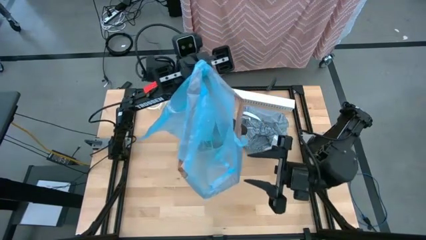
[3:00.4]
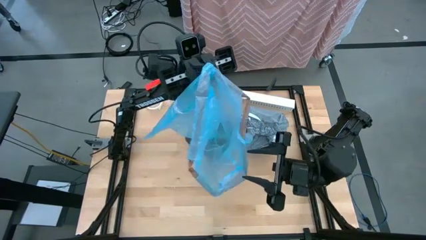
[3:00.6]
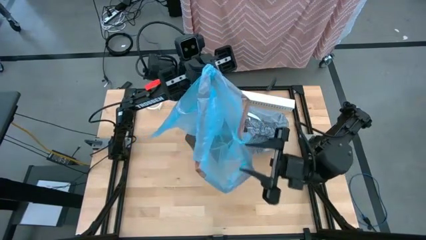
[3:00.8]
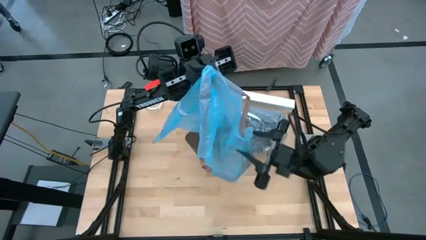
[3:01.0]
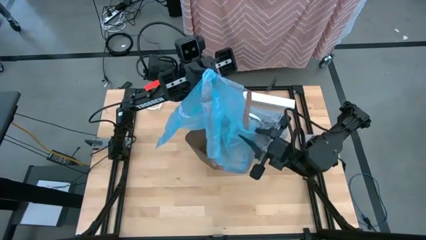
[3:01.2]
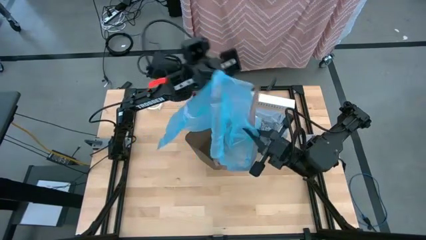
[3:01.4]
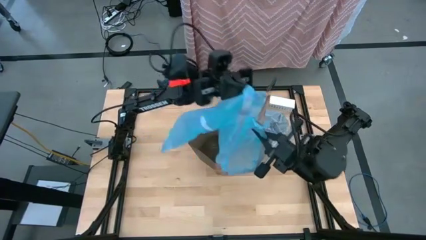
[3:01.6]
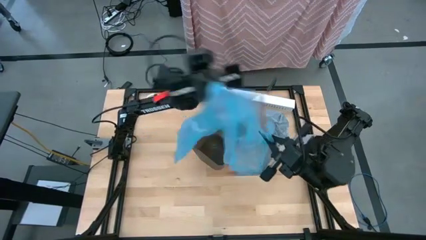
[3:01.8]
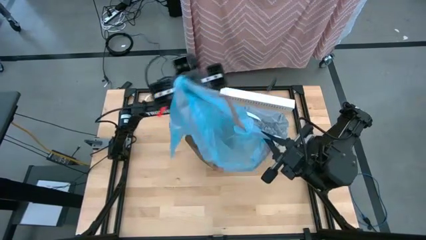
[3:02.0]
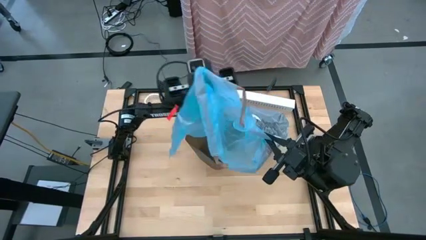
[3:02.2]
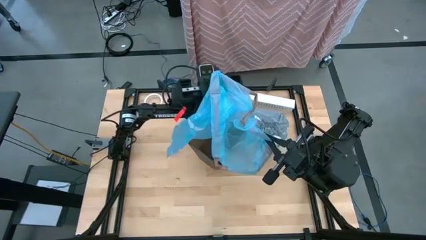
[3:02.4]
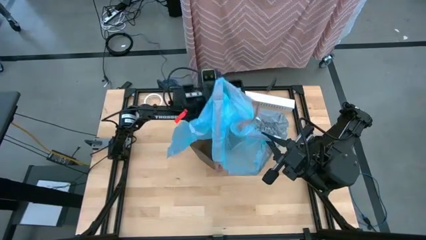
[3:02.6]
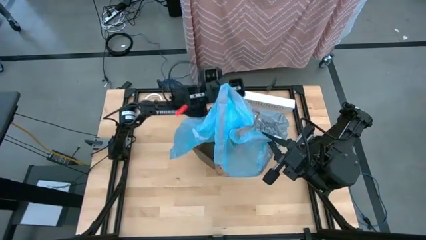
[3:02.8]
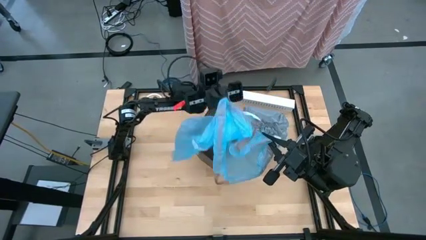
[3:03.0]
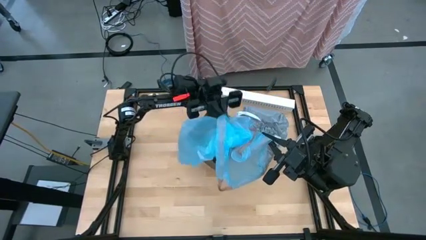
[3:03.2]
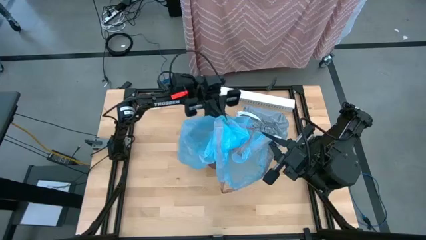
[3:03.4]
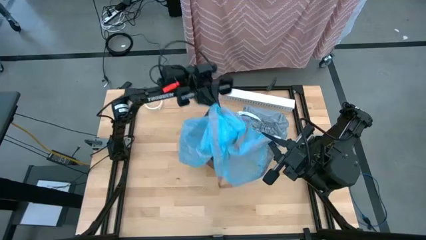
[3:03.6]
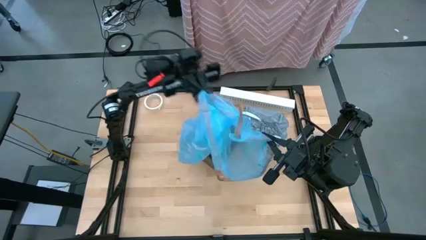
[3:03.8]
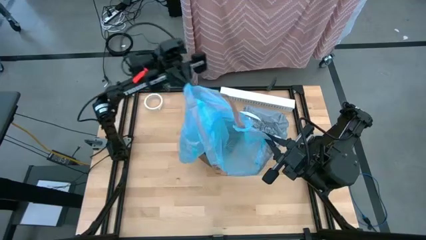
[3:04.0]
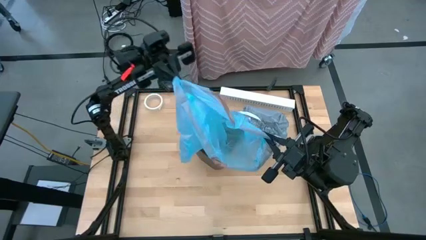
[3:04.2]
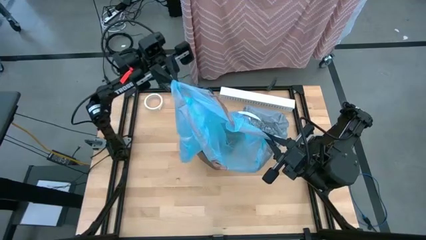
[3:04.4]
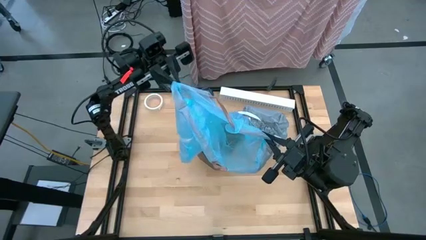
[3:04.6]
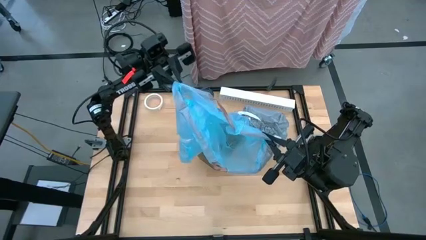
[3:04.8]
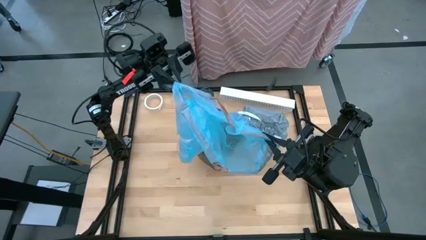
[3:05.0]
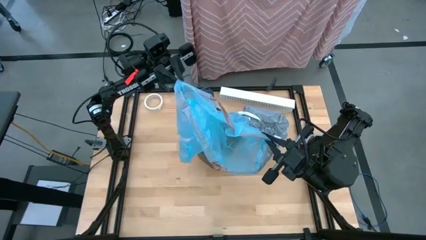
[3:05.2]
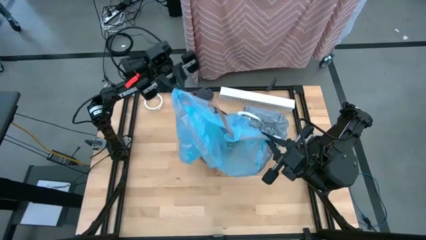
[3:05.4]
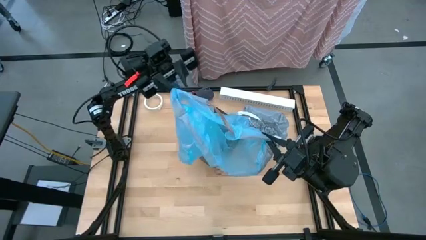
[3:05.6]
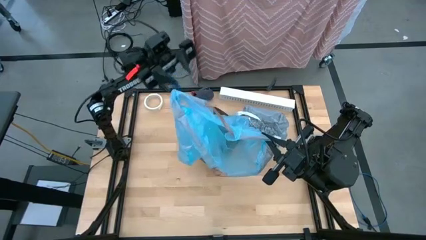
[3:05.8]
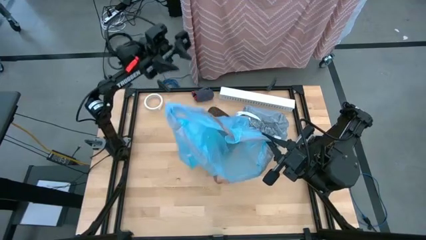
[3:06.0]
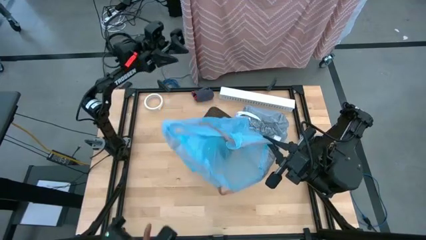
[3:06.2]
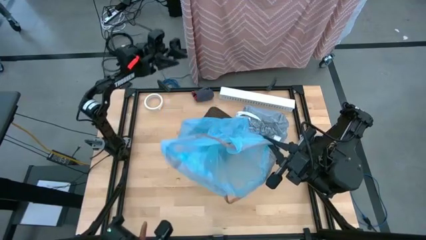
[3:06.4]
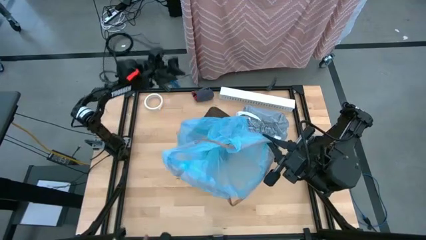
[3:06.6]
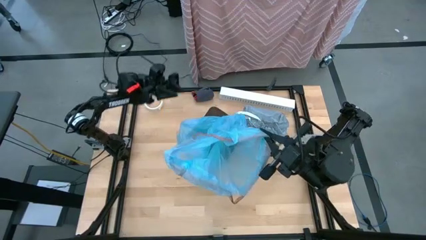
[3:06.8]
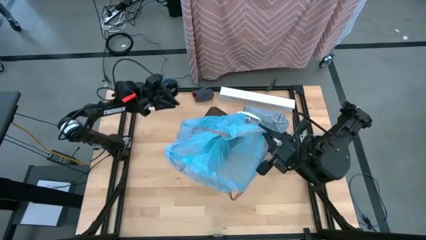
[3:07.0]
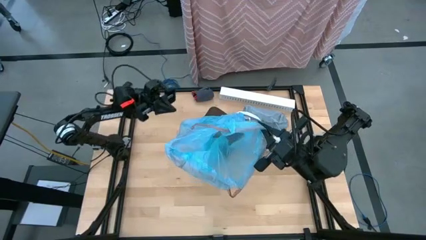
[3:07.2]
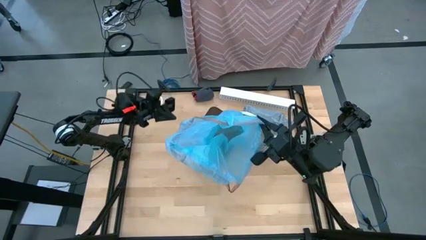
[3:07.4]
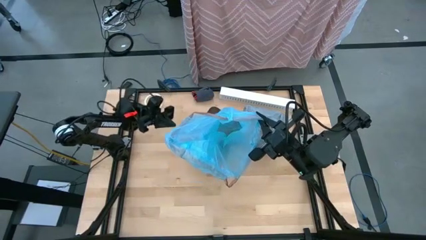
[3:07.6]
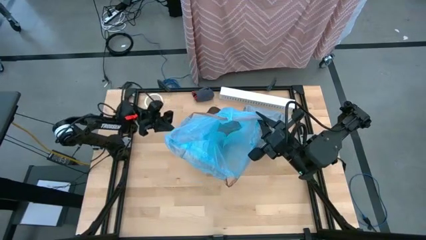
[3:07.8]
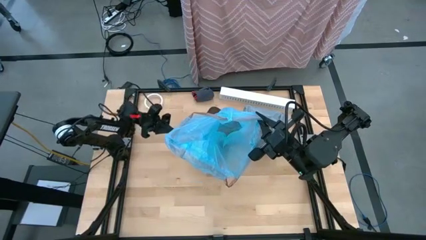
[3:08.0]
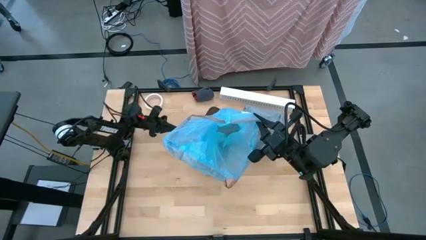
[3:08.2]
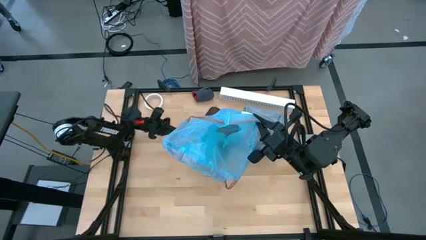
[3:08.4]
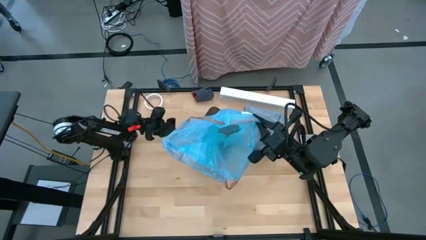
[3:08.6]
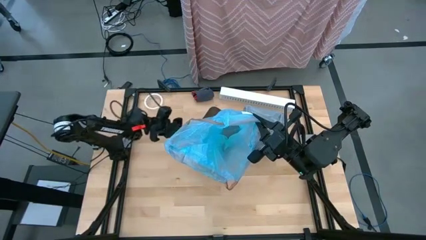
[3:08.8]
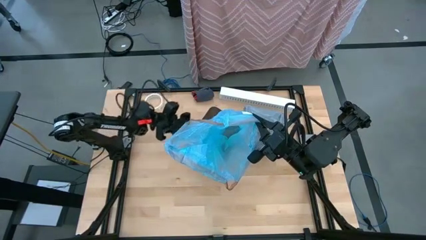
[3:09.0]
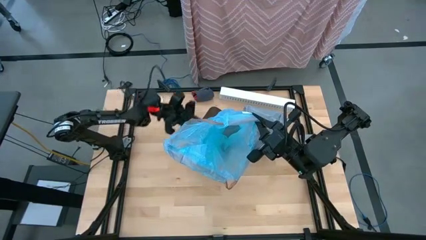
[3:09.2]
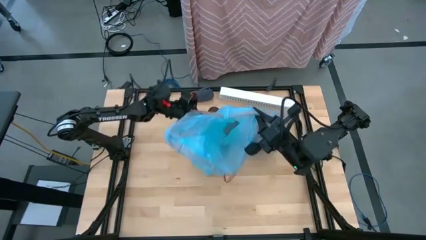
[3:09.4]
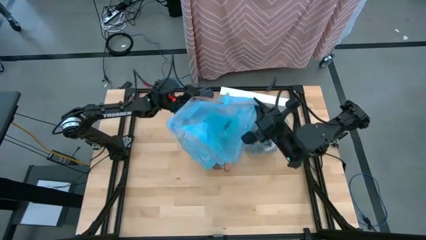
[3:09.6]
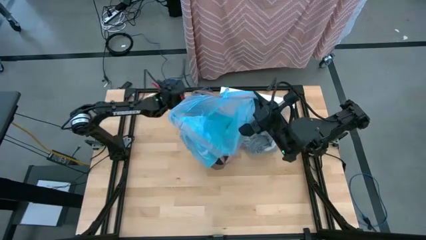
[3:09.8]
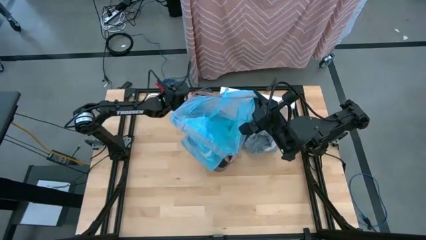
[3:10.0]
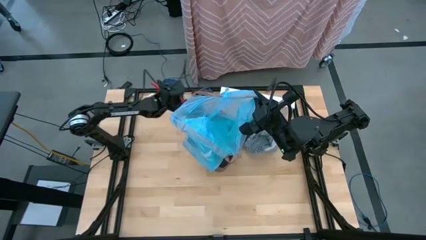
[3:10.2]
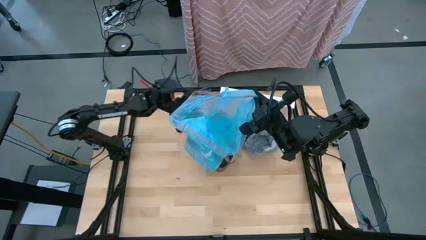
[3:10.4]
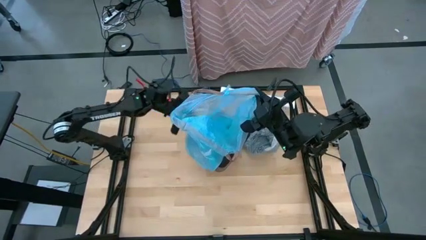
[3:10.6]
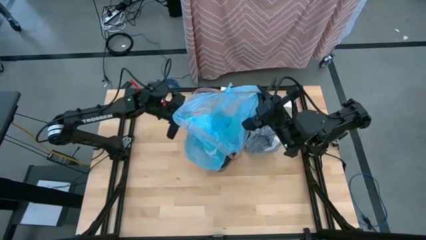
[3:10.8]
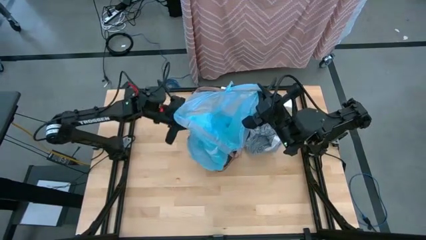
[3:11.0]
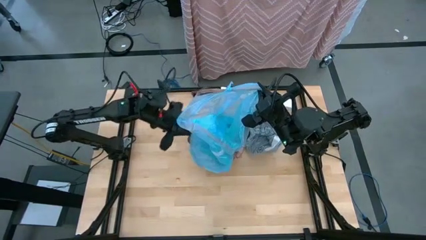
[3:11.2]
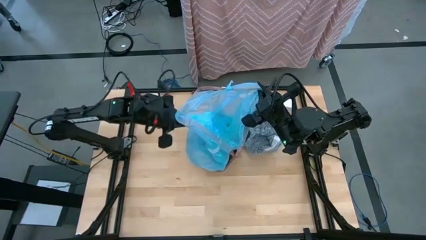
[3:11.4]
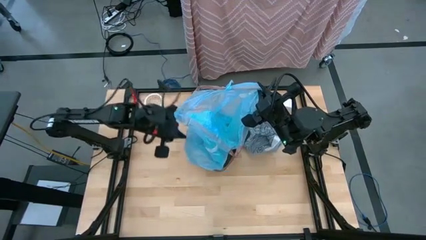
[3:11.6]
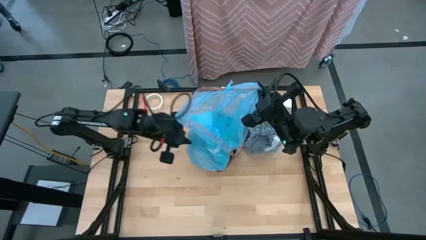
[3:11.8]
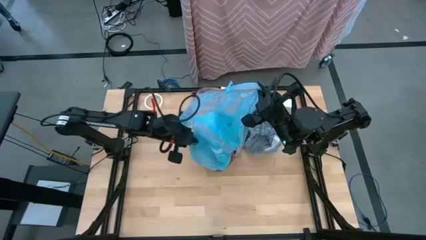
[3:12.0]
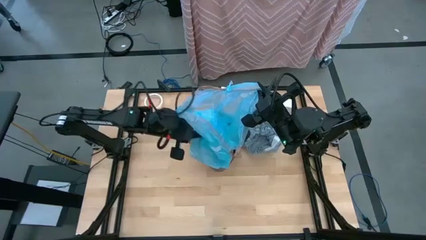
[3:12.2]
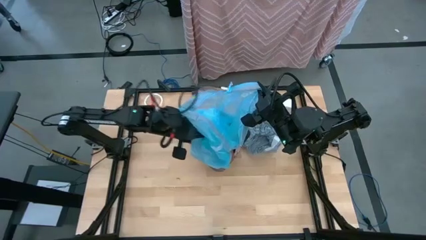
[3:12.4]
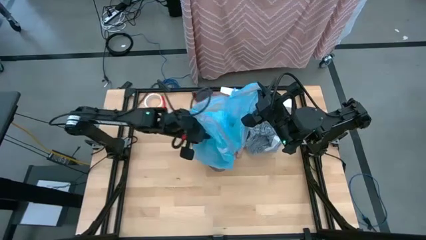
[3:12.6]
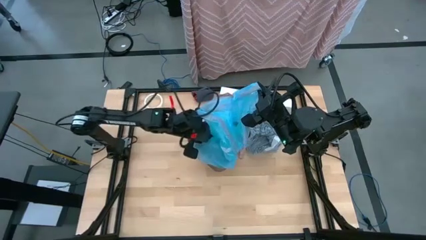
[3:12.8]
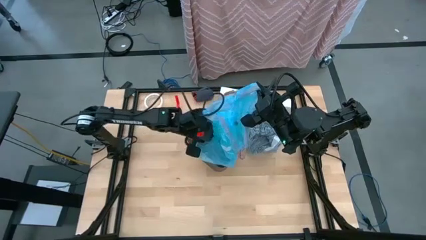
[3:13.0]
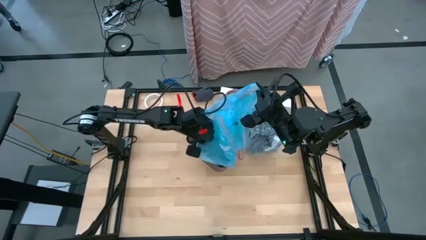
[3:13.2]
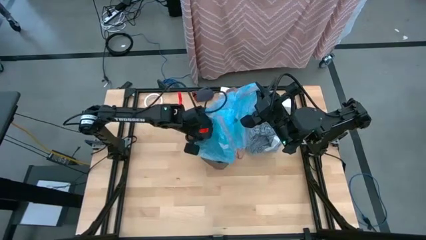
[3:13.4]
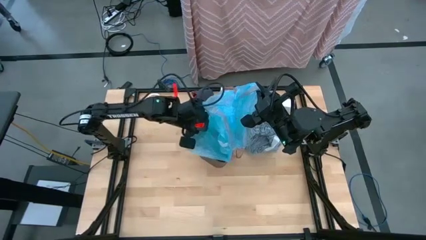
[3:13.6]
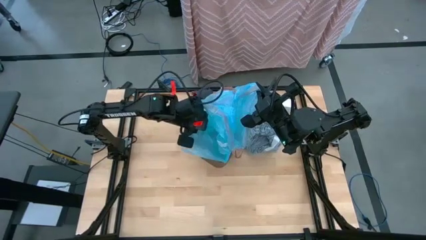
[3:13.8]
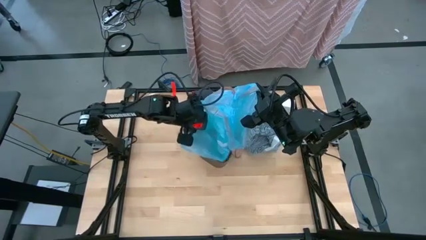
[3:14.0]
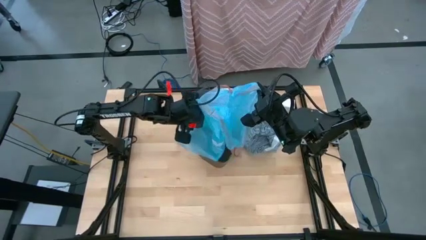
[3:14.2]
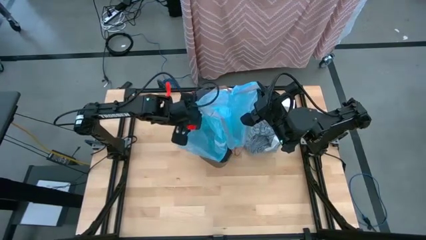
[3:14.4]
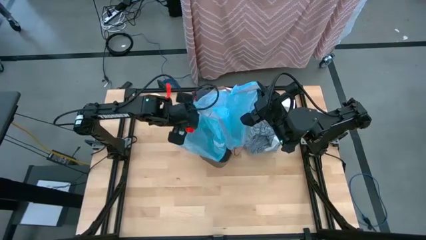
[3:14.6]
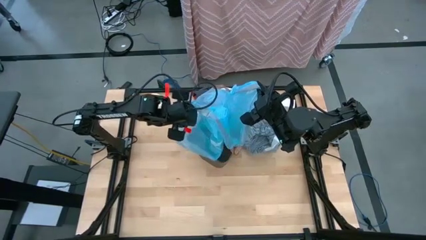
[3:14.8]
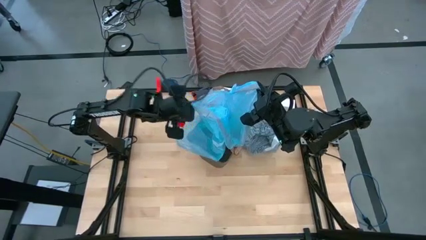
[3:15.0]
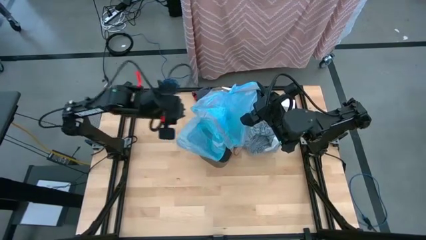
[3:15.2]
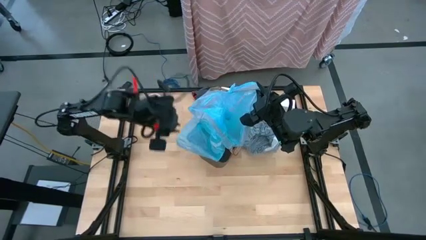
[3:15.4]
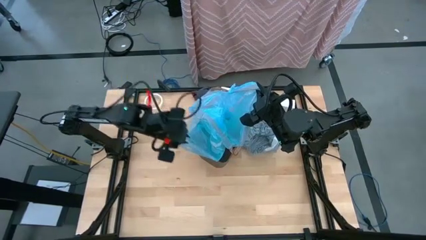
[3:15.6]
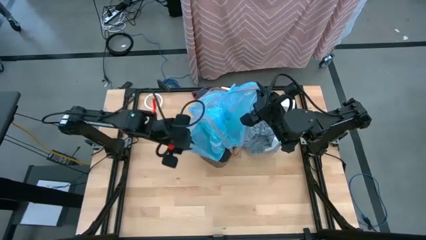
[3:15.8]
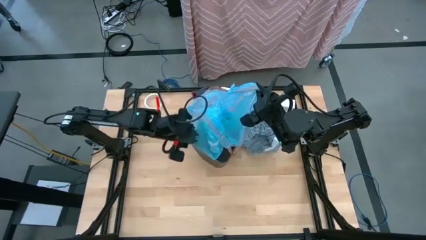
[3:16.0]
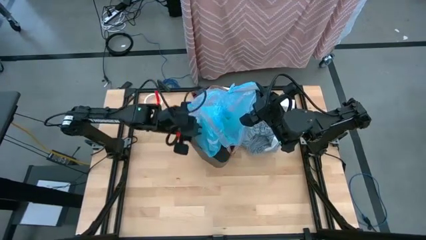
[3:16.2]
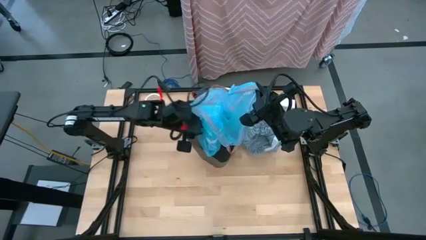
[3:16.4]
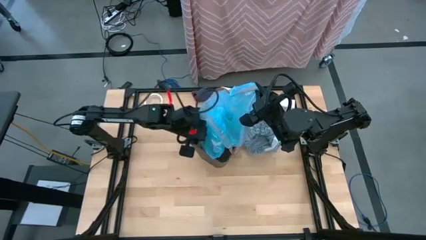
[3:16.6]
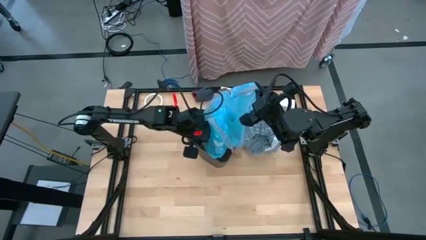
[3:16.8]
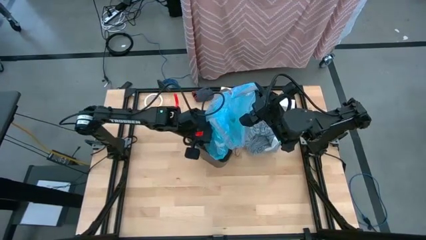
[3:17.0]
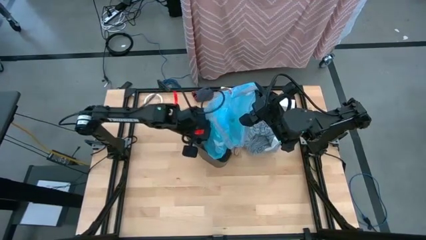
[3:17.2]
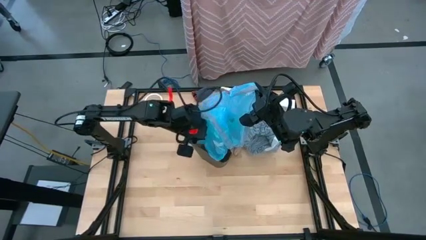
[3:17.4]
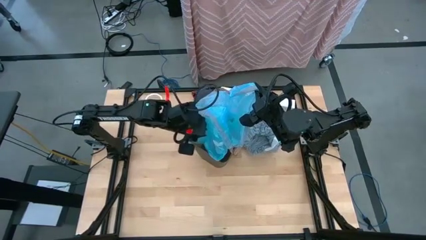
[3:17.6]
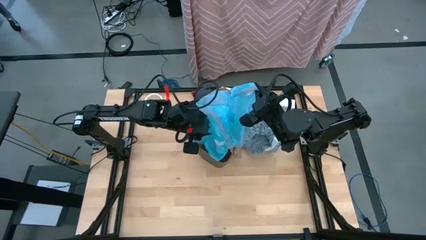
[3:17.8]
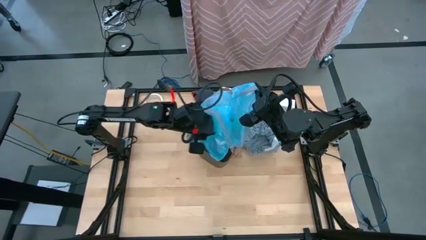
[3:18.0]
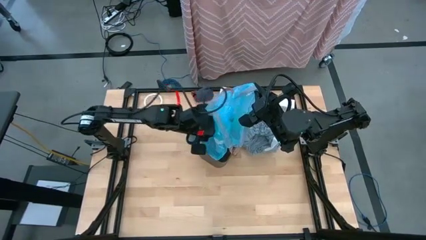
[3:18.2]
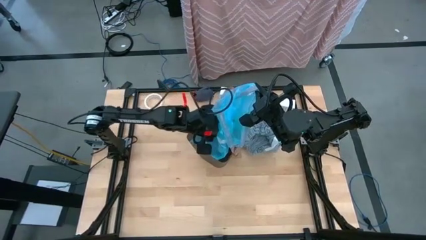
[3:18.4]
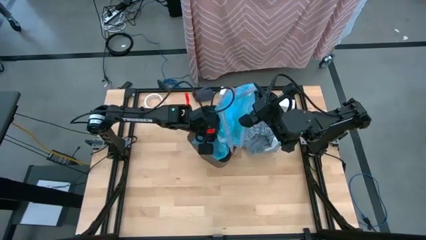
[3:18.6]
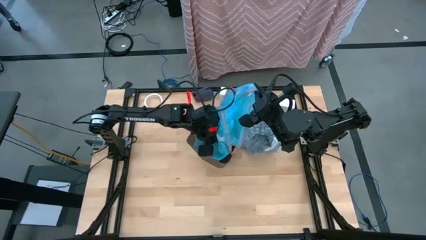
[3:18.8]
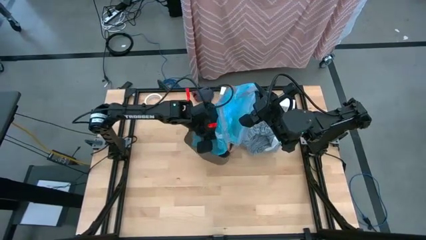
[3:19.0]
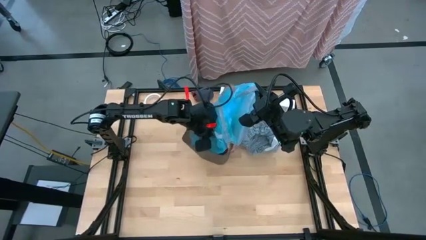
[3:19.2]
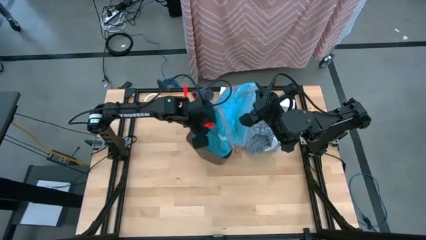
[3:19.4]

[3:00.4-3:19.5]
Task: place trash/remove bag and relplace
Insert the new blue trash bag into the black trash bin
